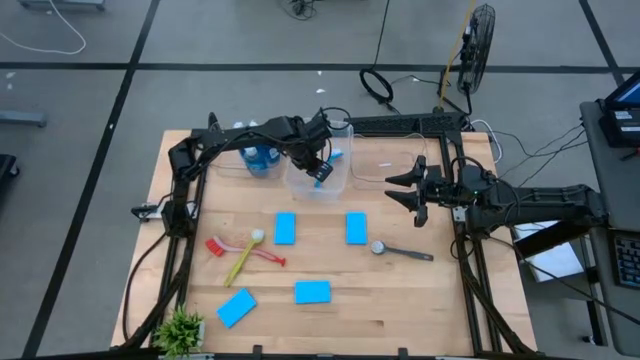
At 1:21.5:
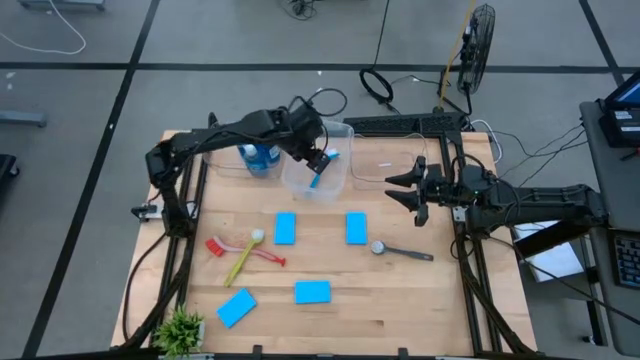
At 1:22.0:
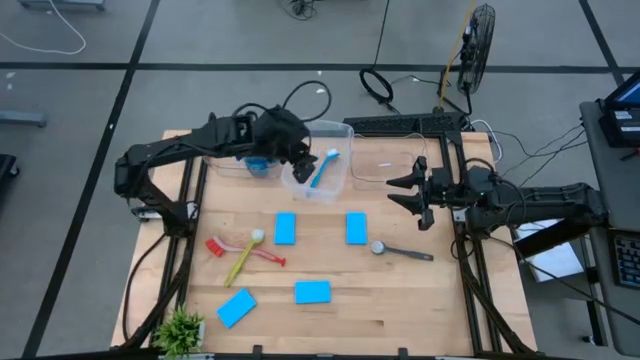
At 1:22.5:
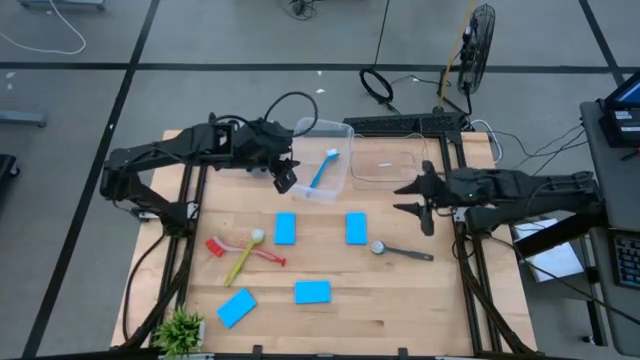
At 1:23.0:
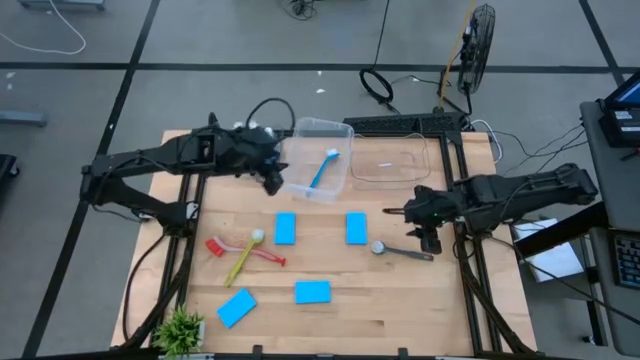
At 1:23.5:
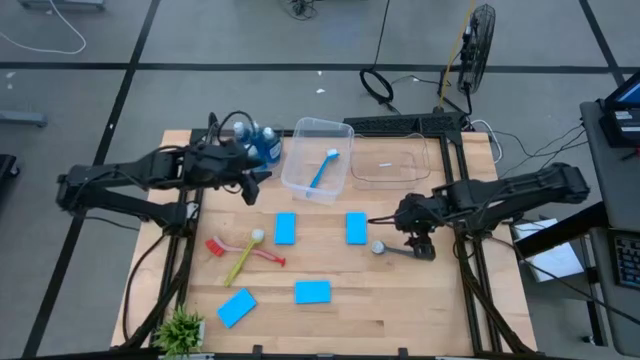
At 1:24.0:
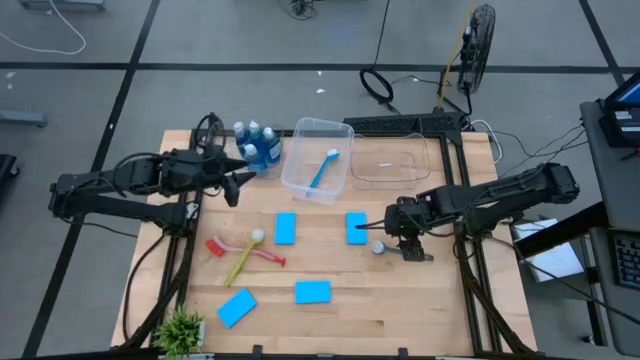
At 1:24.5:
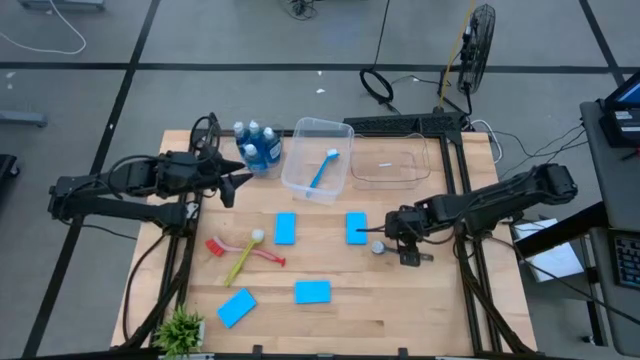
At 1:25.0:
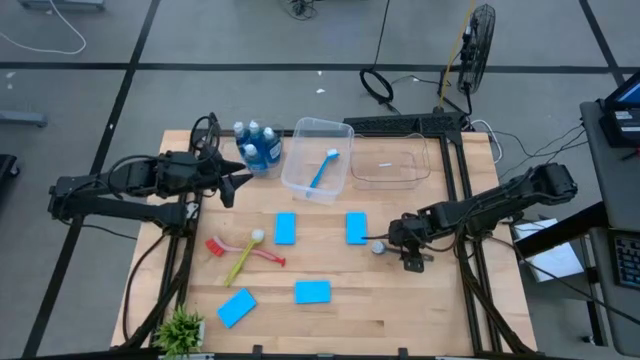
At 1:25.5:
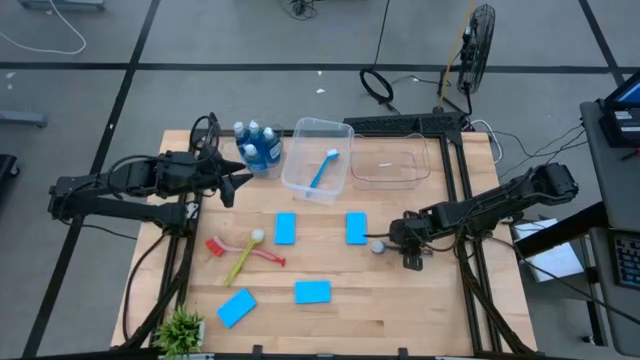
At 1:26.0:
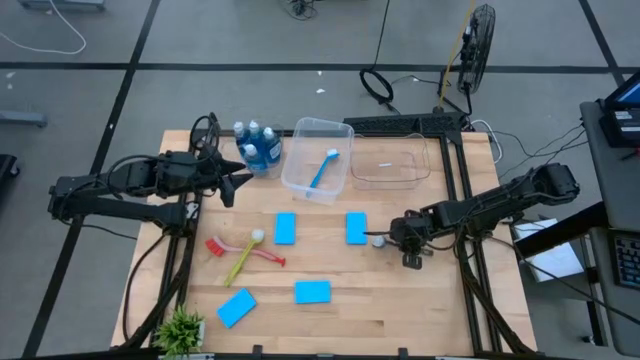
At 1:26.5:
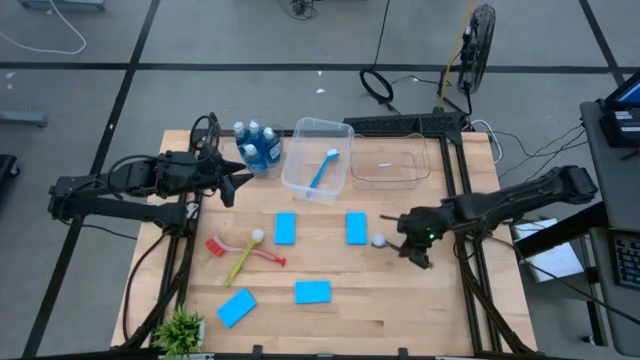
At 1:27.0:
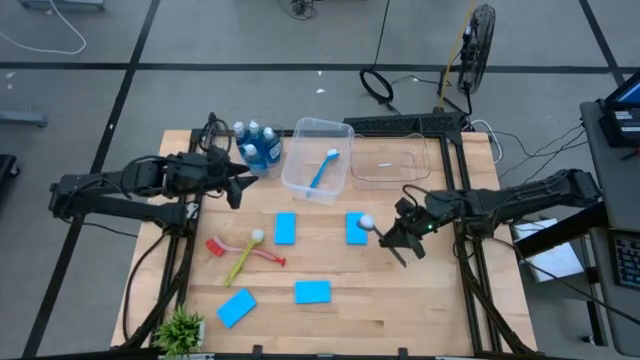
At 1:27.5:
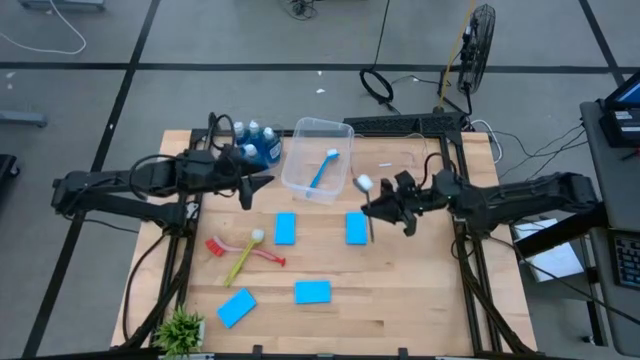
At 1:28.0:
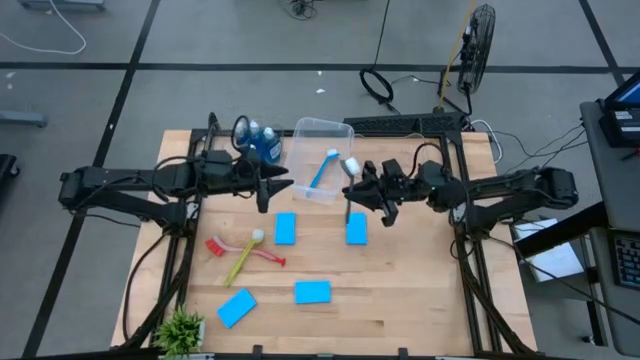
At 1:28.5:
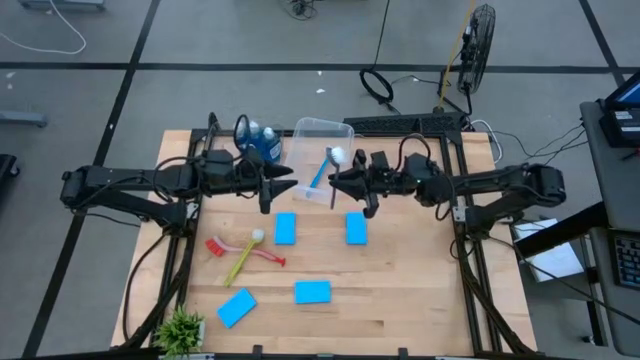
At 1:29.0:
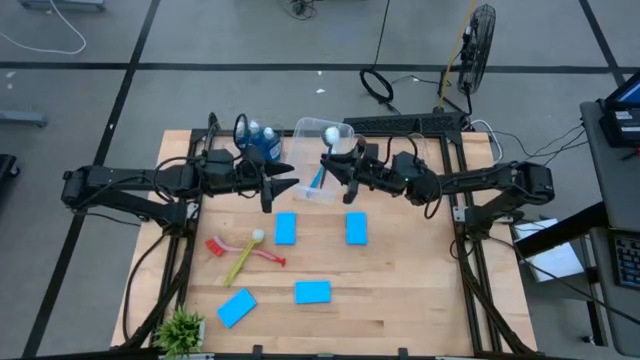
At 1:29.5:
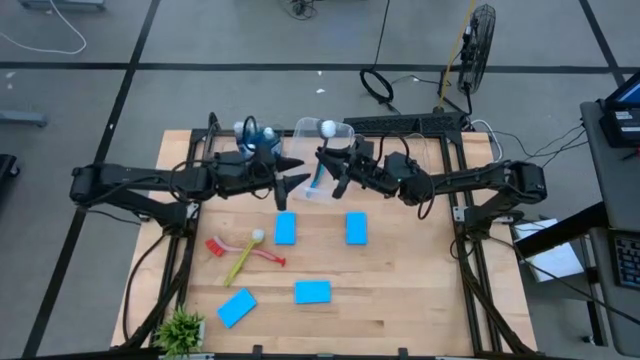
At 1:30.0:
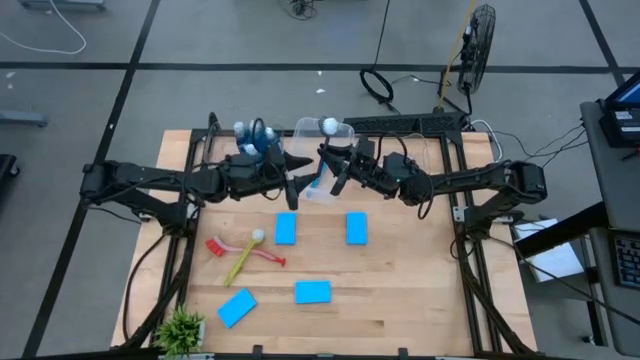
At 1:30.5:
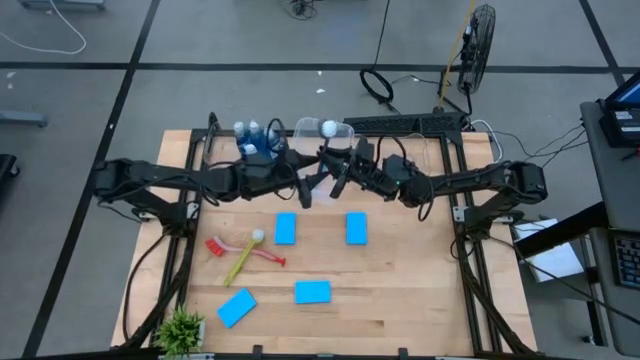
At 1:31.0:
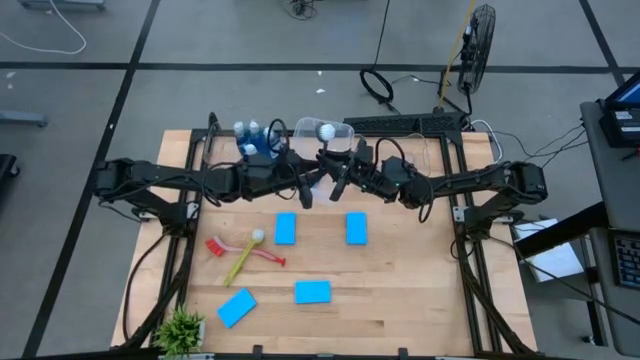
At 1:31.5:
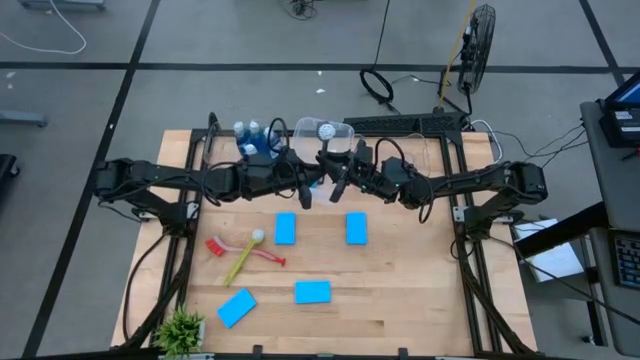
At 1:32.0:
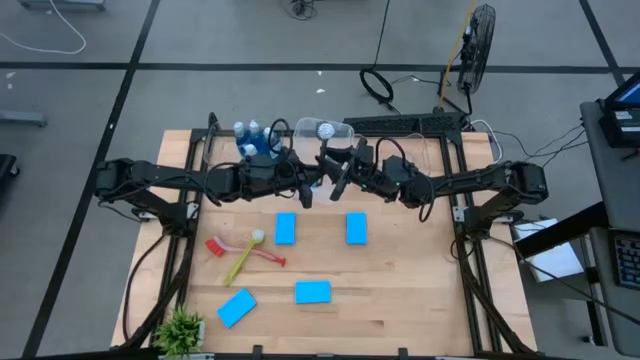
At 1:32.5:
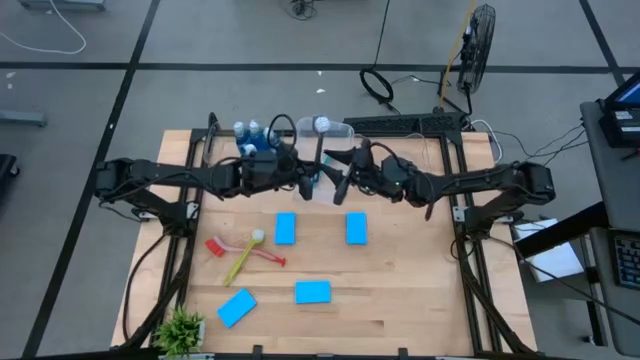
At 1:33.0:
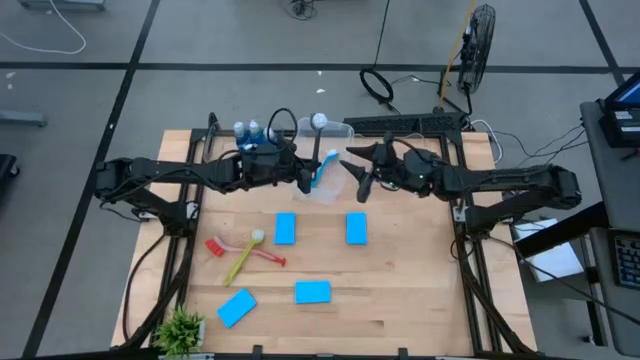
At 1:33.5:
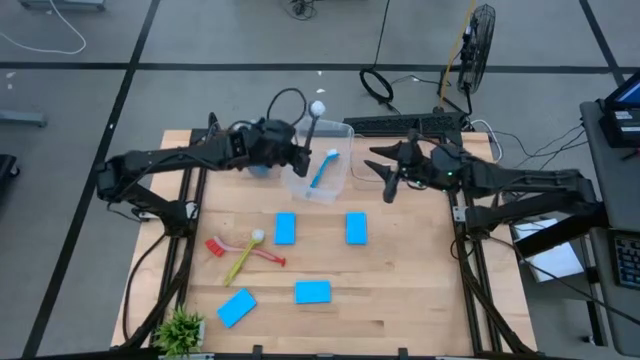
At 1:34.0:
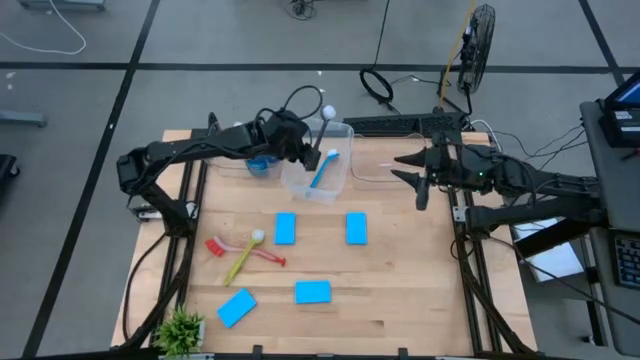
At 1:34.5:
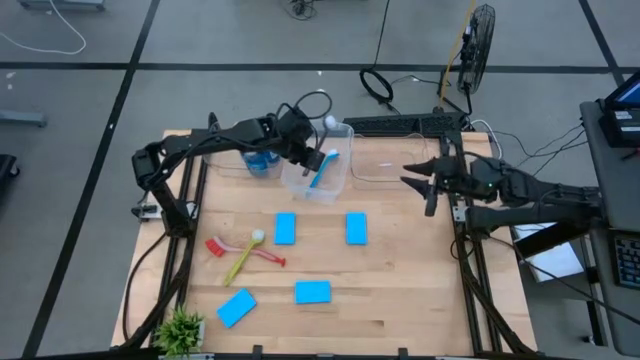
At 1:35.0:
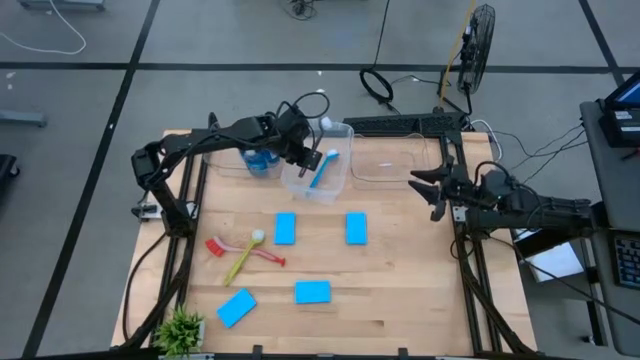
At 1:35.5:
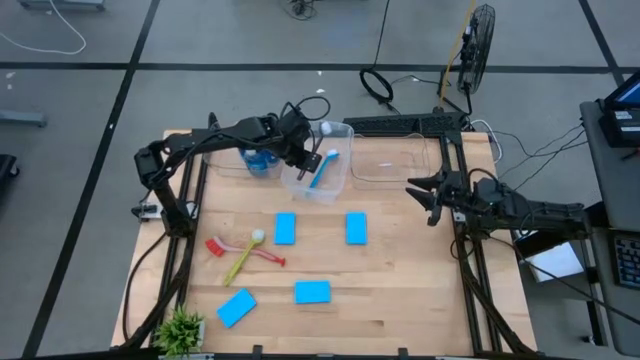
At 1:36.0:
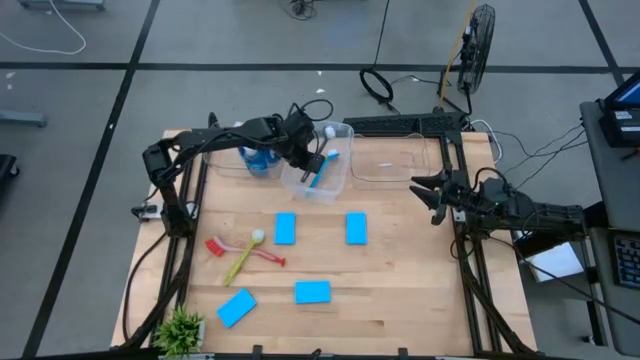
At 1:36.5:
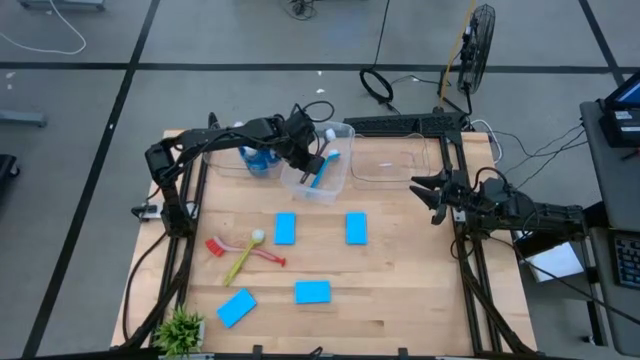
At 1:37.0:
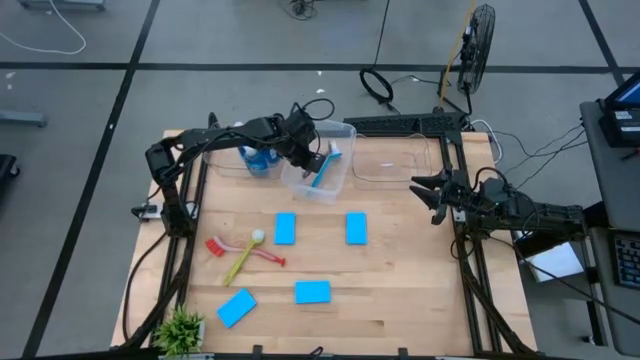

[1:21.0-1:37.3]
Task: Pick & Place Kitchen Sink Supplies
Put the gray dish brush into the transparent container

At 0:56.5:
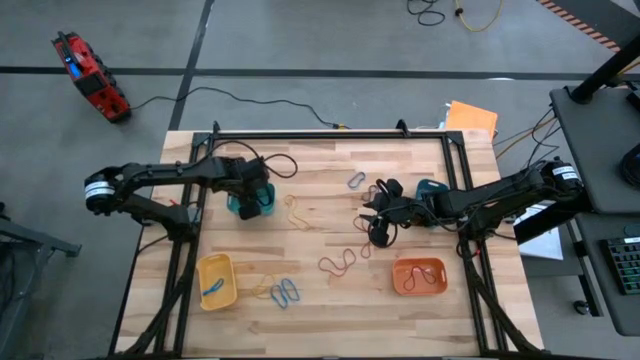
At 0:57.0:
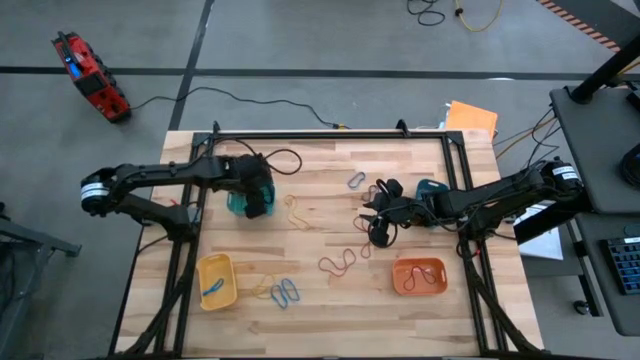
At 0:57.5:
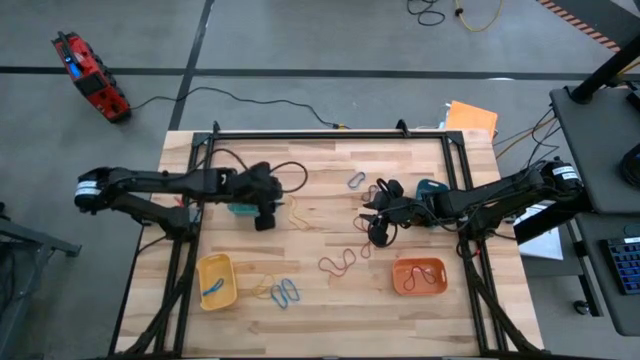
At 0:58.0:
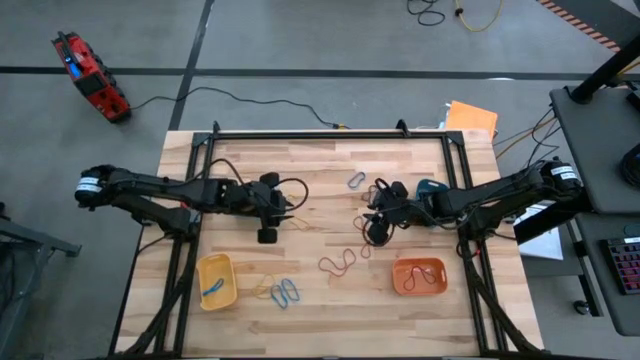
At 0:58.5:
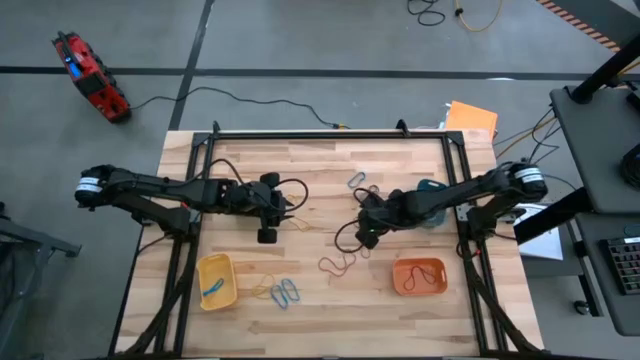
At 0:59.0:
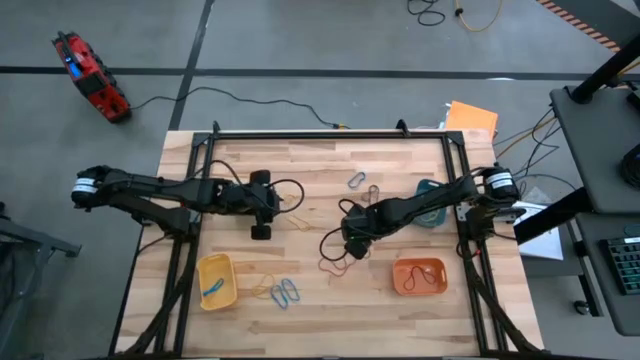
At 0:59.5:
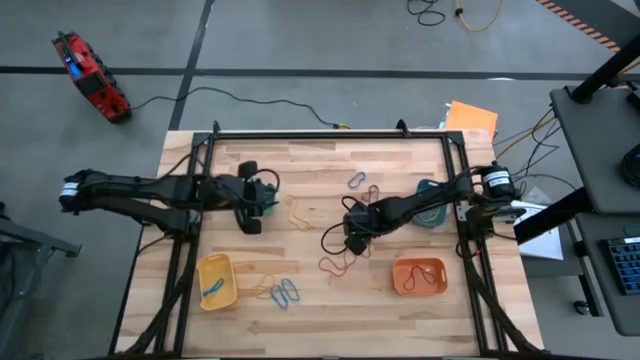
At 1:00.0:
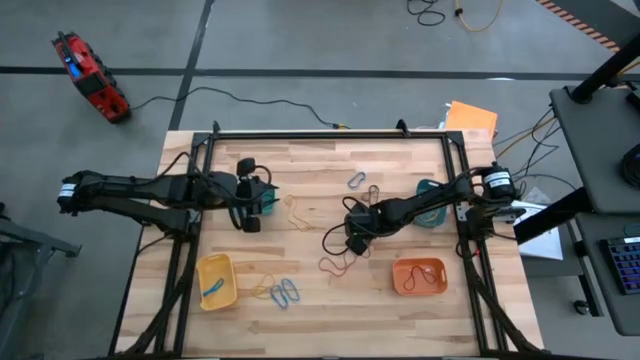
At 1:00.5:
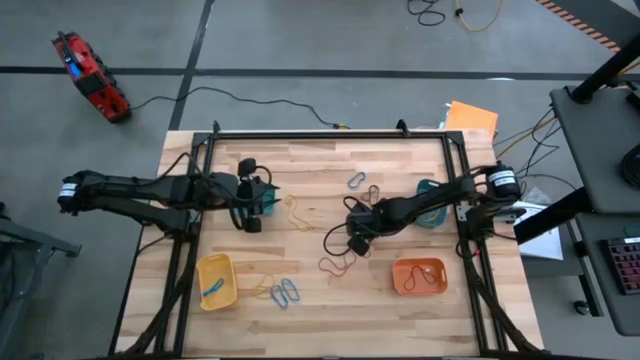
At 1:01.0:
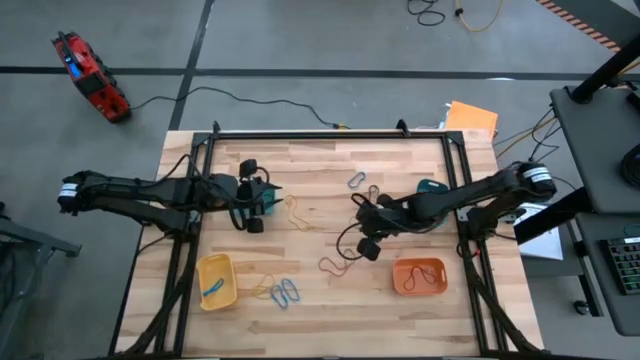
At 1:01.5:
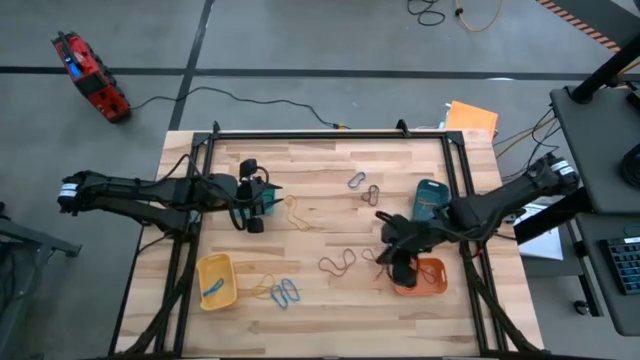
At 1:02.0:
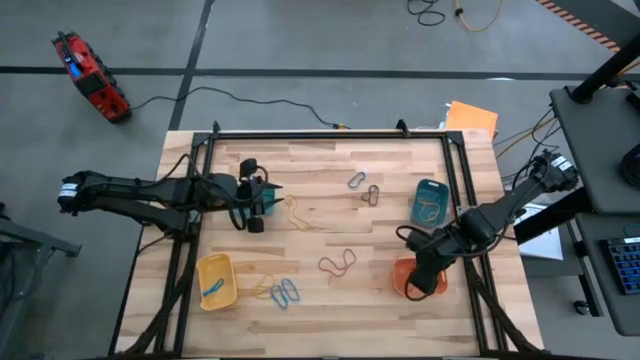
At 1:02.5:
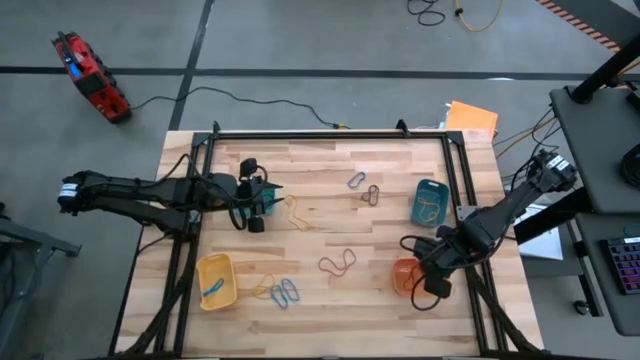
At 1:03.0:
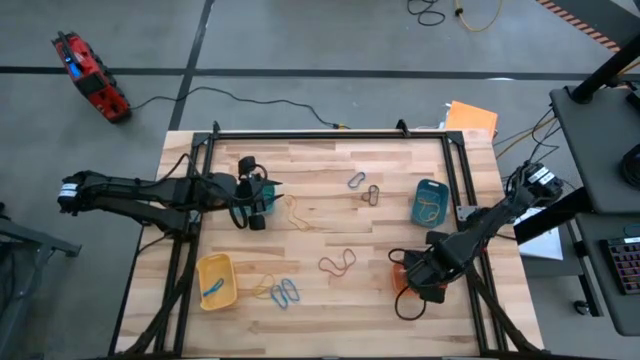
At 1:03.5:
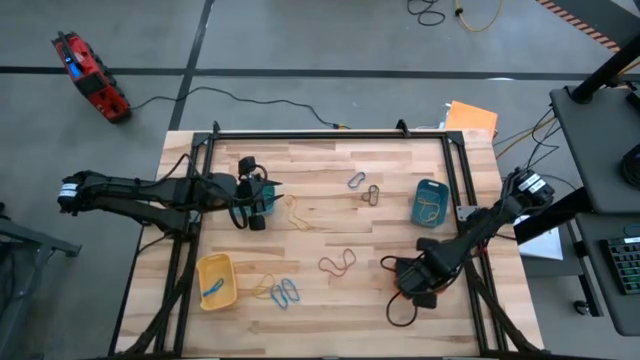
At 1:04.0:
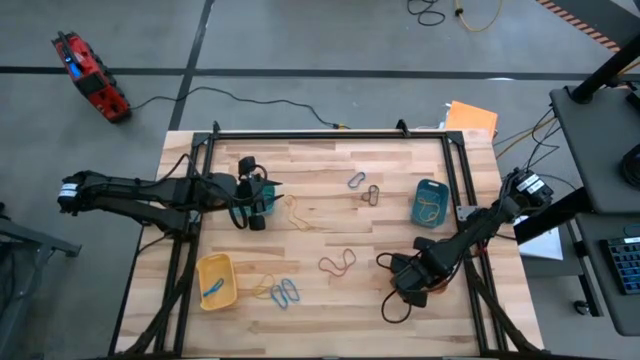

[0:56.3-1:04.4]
Task: Sort rubber bands into baskets
Put the red rubber band into the orange bin
